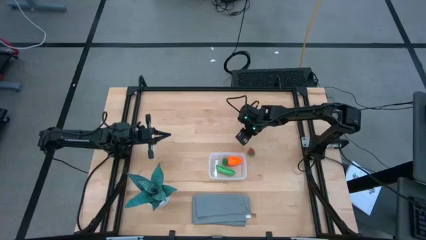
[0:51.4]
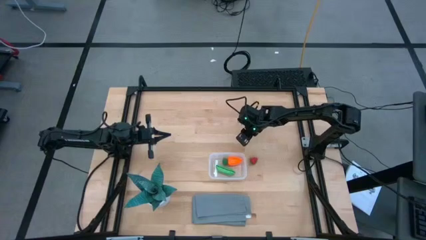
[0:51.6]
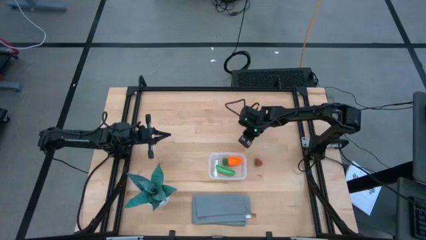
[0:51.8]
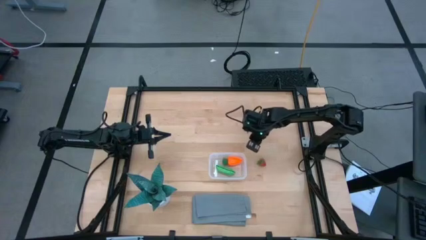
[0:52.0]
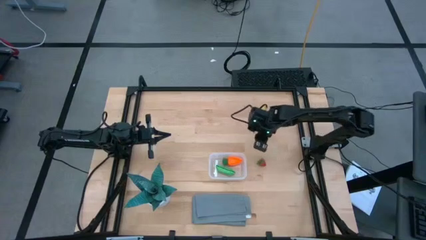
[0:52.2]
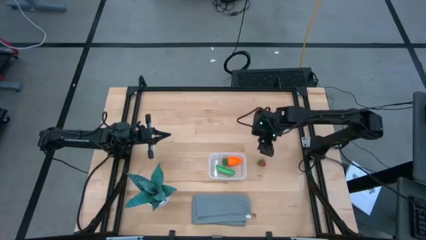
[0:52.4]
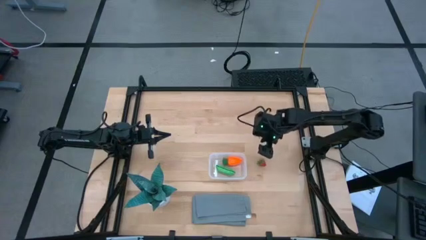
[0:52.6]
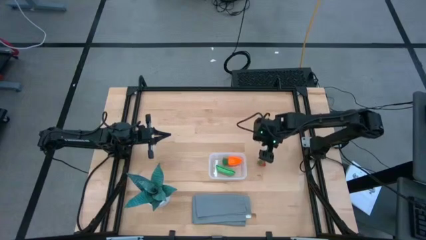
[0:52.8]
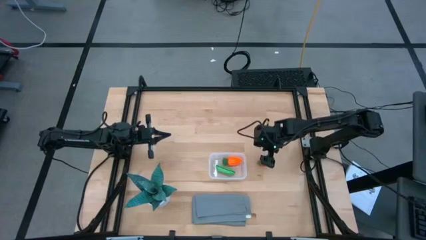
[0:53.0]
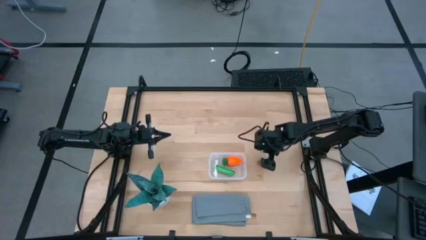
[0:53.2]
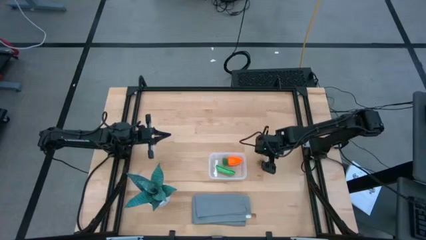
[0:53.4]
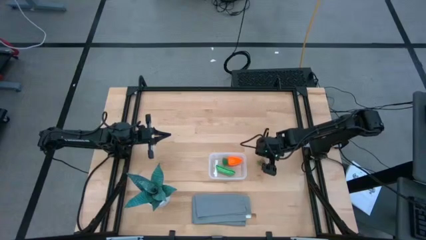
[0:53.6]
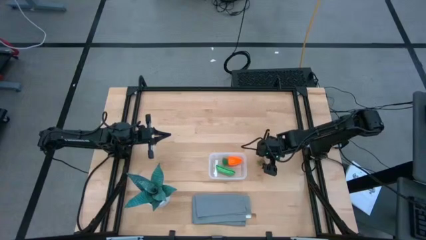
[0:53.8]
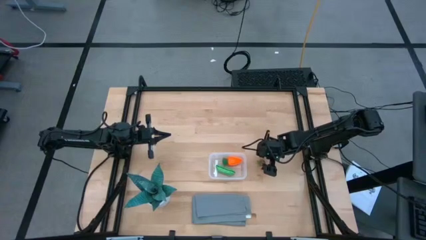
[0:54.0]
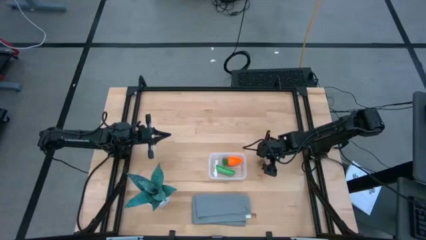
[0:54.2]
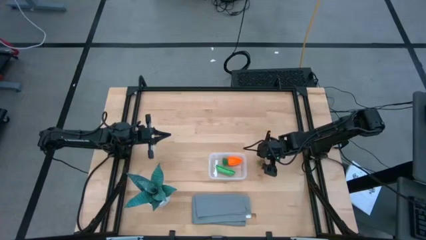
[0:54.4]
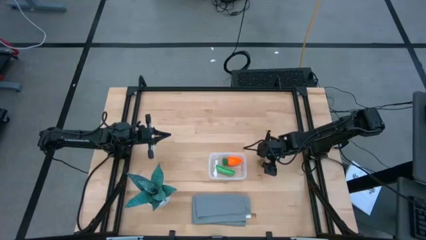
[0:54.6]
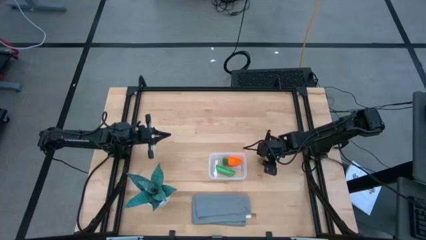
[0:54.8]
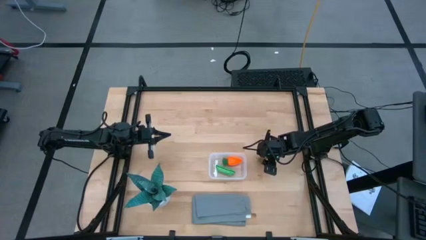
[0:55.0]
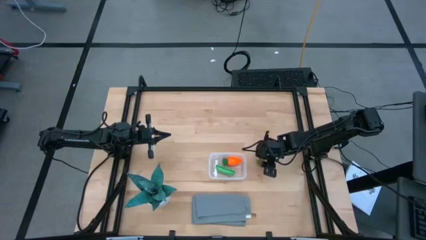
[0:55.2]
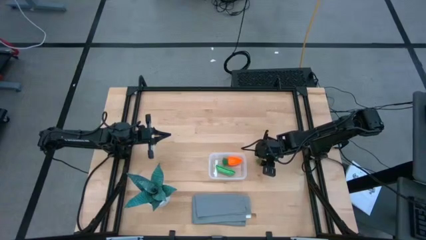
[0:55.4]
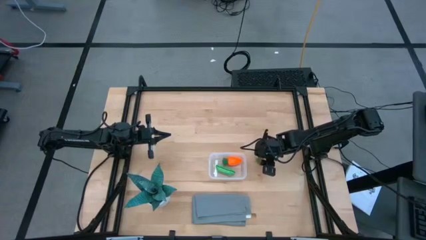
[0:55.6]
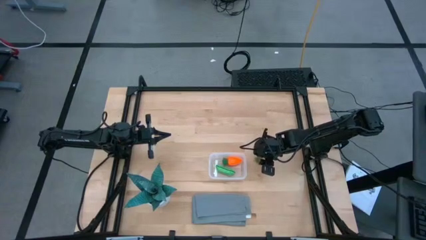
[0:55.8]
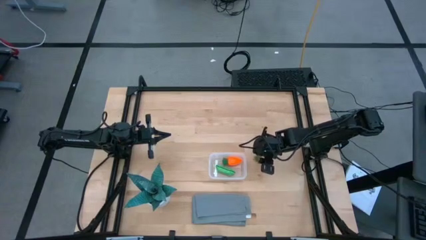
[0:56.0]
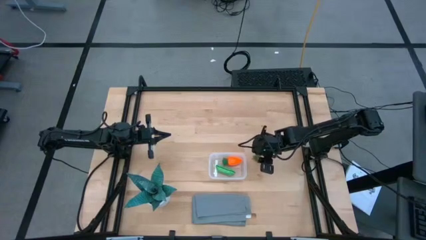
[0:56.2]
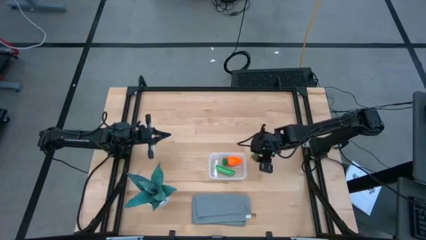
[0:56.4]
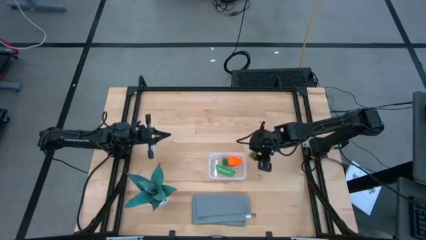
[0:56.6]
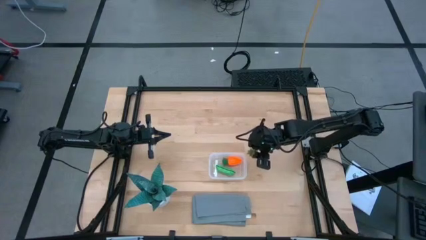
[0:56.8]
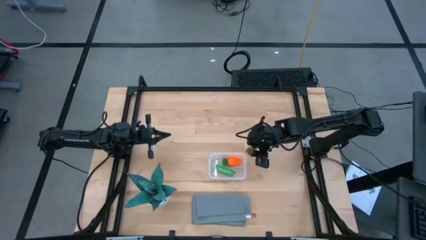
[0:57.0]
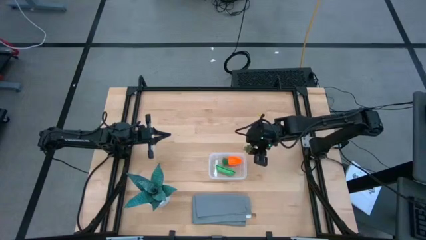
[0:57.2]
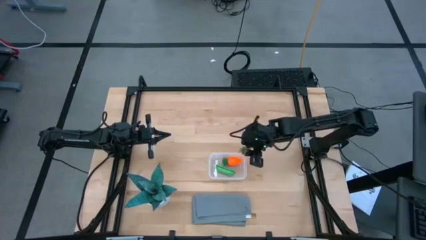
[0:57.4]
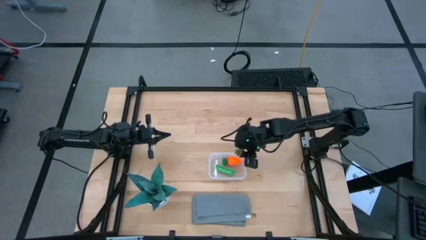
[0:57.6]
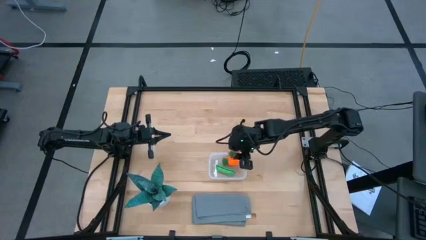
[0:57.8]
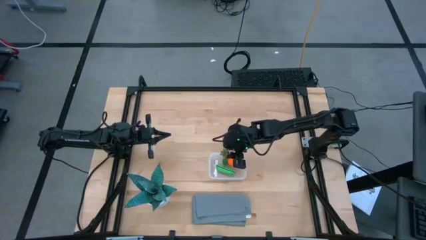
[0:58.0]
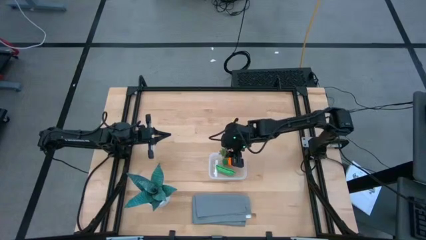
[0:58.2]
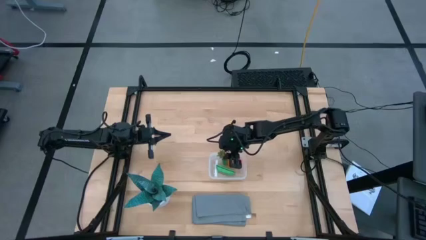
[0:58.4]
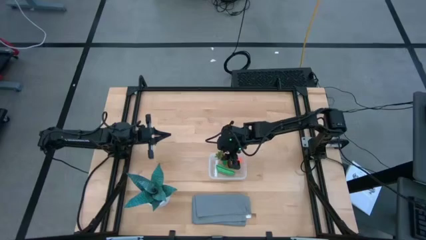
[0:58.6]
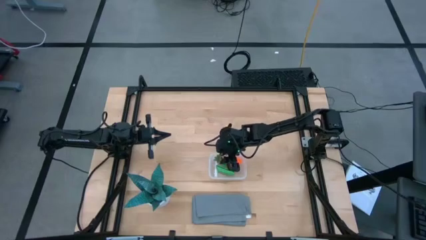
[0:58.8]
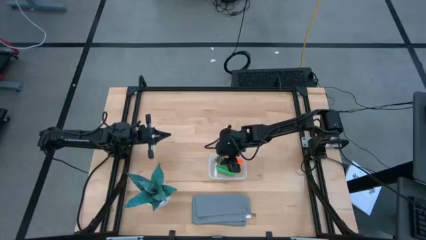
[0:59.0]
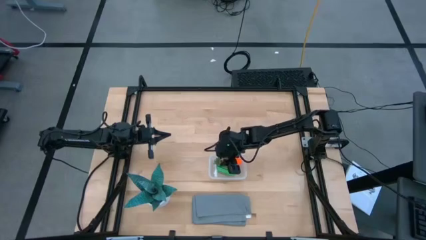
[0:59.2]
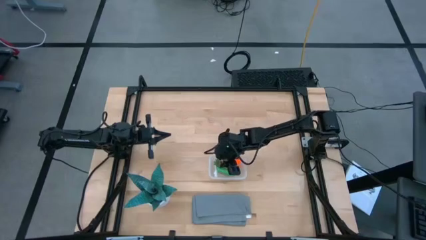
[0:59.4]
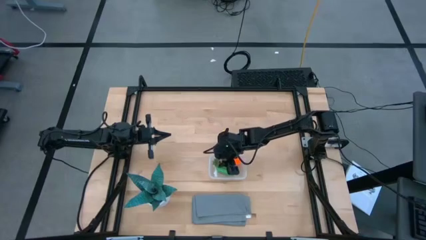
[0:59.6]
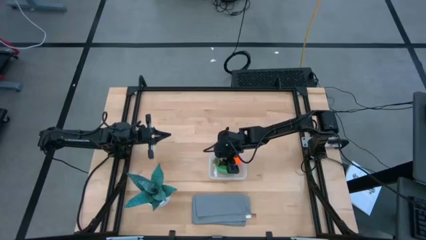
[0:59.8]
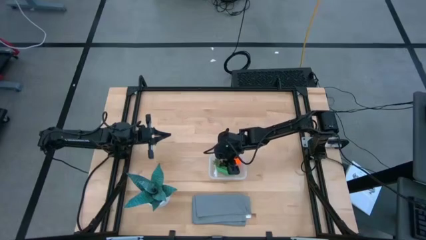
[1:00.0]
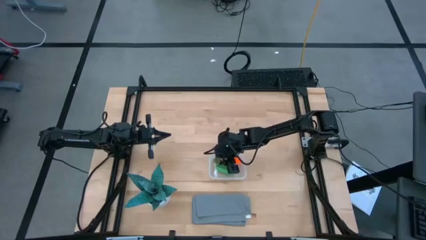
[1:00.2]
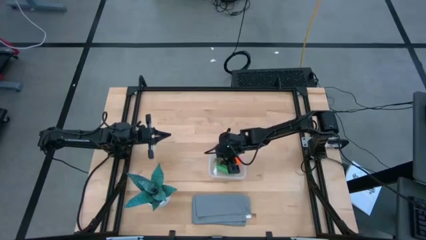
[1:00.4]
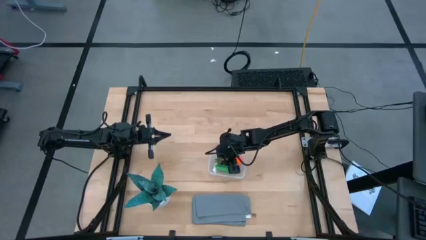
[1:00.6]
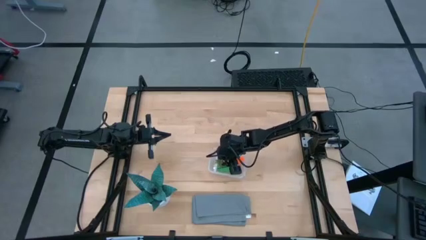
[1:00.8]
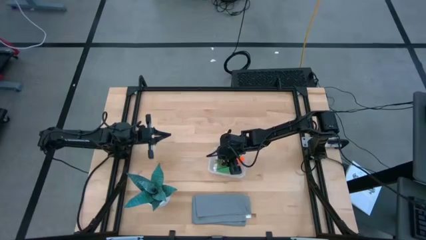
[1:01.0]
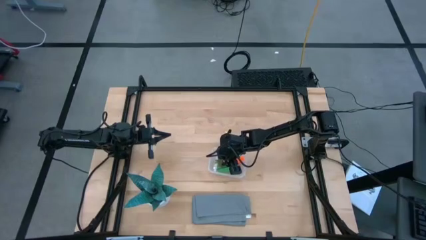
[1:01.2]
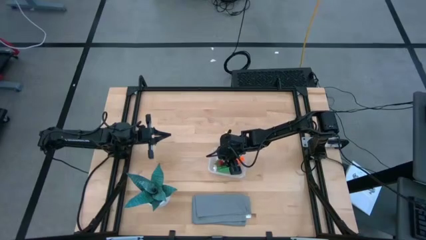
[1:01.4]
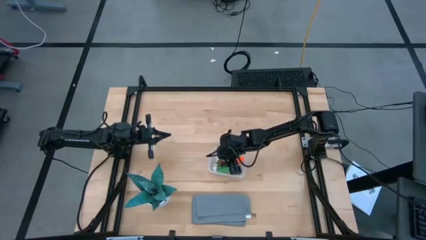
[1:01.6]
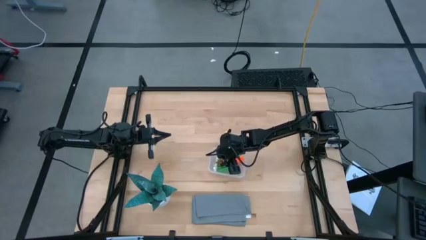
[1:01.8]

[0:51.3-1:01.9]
Task: Pick and placing Produce into tupperware
Put the red strawberry into the transparent bin

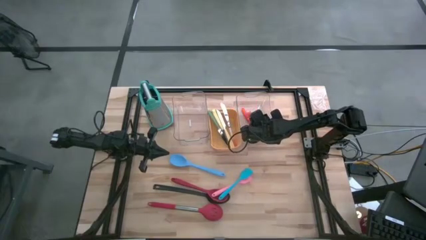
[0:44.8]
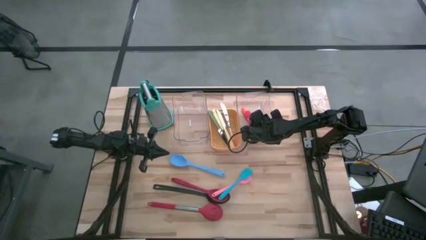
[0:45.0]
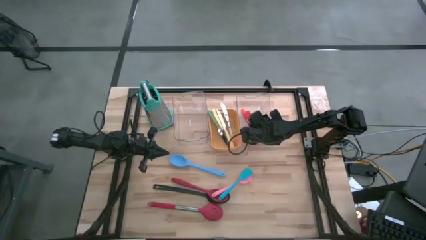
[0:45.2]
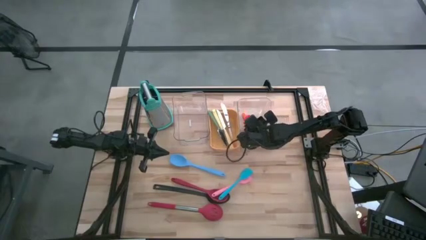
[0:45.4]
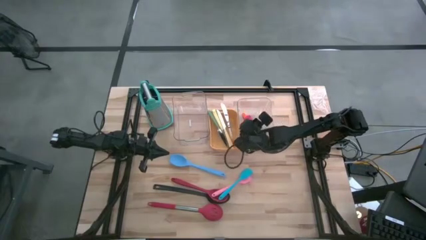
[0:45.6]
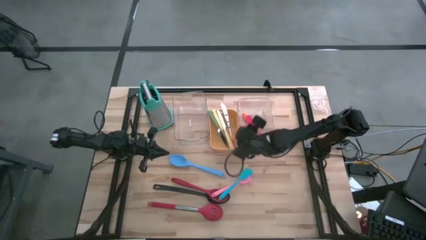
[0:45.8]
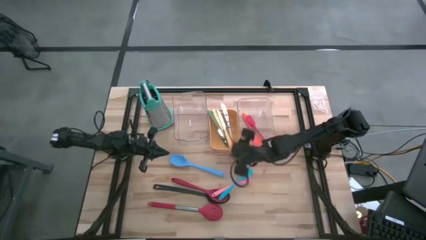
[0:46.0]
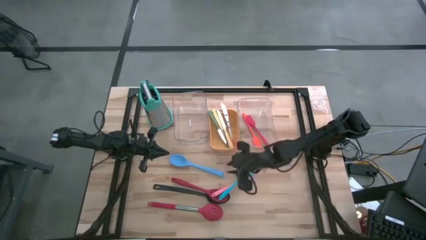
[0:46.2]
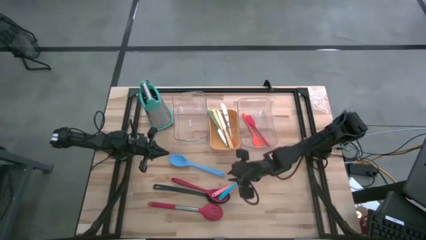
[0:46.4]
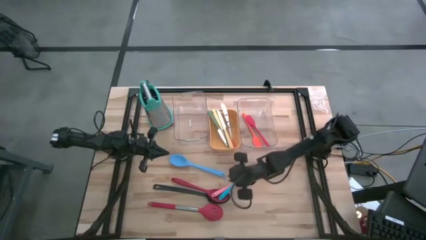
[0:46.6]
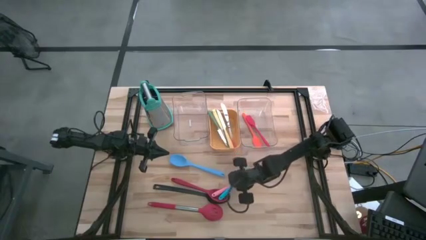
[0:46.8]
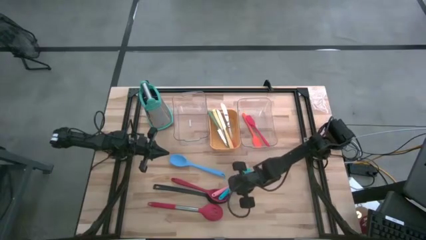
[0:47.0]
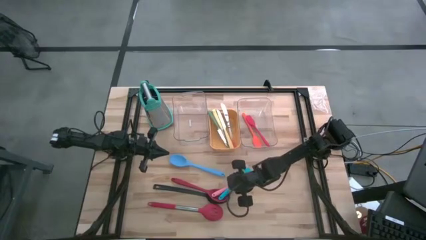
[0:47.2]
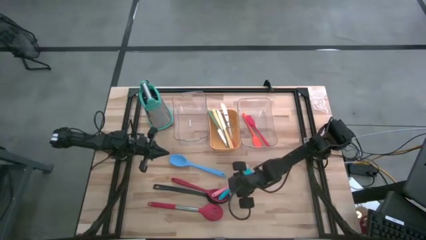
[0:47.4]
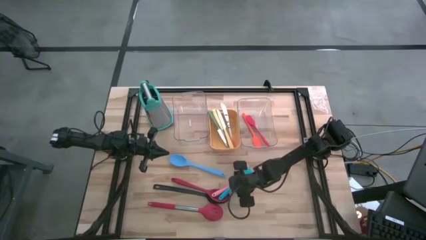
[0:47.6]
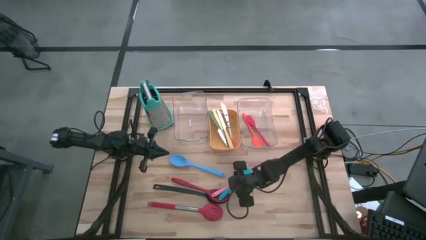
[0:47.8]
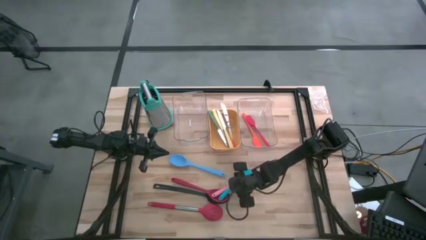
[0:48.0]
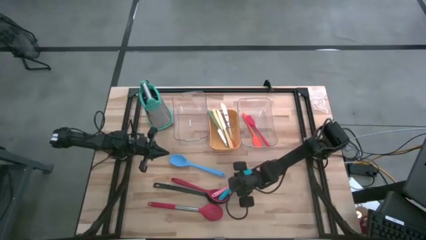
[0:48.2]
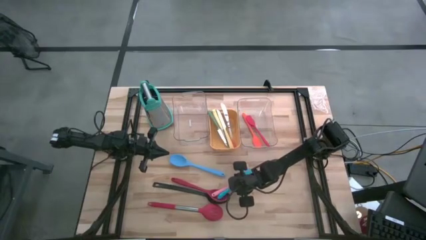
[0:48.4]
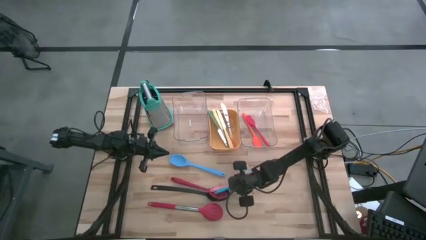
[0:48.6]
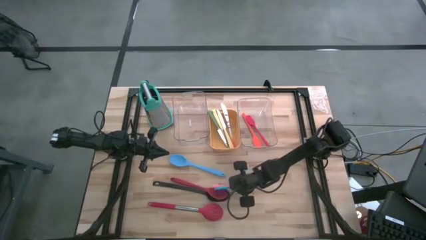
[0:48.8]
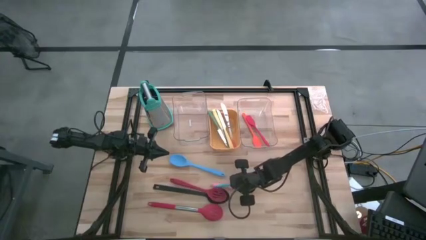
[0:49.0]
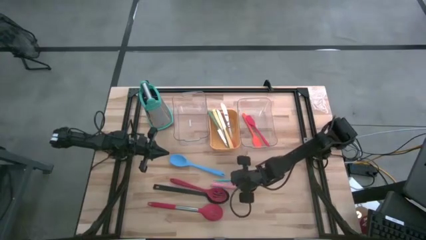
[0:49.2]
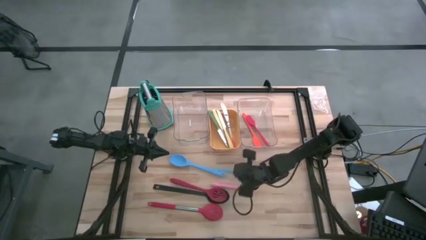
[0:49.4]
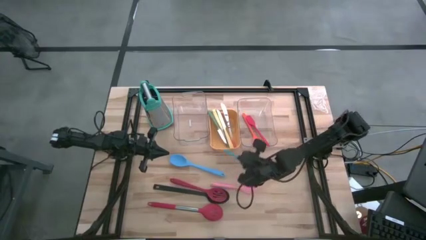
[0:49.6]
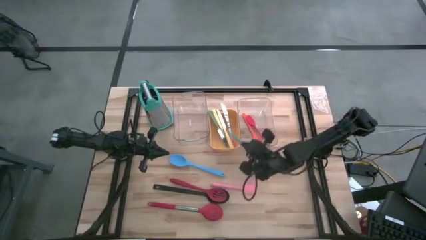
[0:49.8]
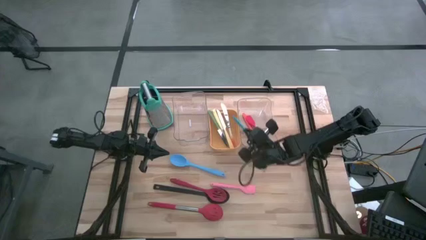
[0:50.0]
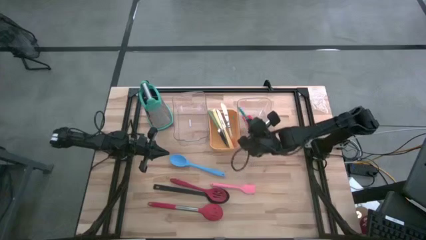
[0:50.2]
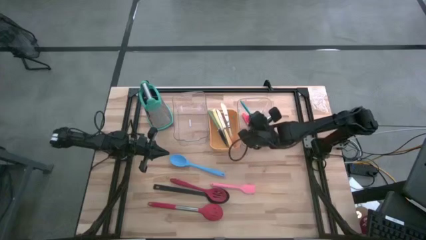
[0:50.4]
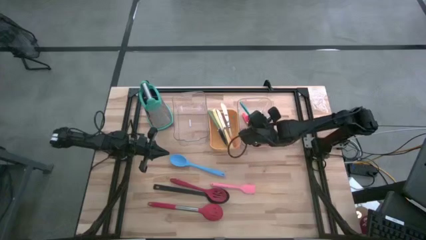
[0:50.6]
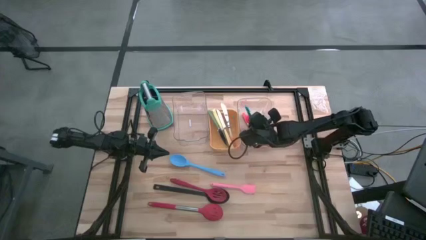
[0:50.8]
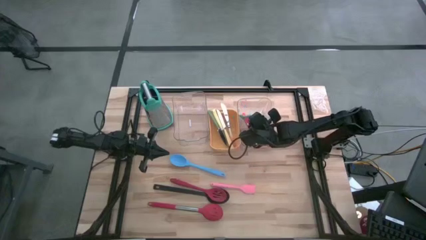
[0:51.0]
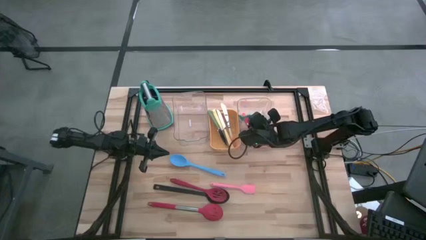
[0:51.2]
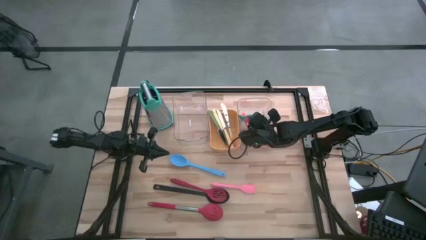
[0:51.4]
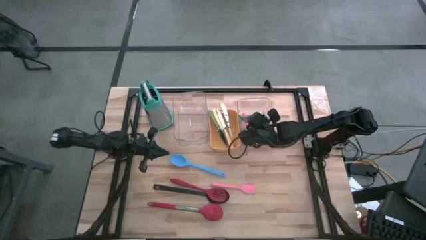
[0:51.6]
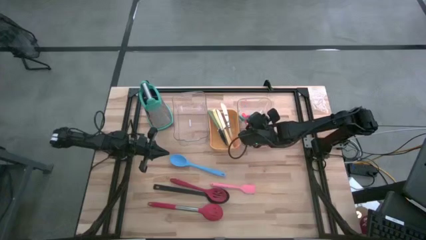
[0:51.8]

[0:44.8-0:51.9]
Task: Pick & Place Kitchen Items
Put the blue spatula into the right transparent bin
